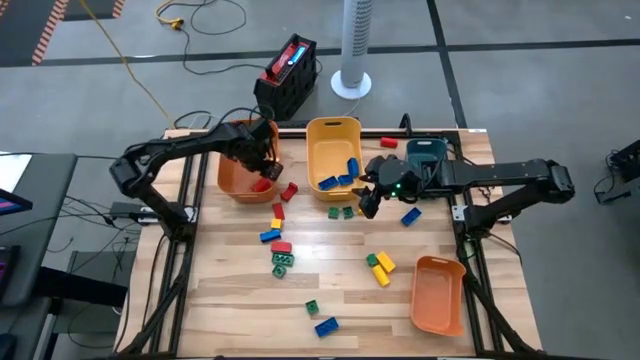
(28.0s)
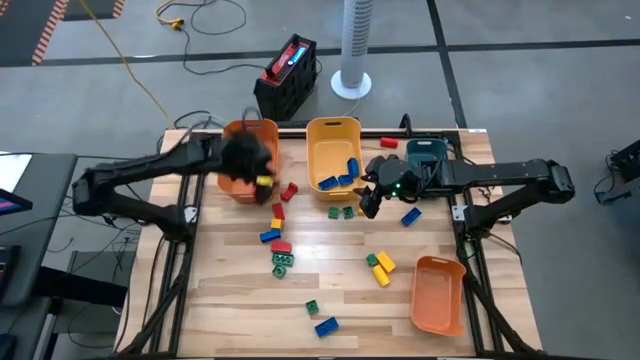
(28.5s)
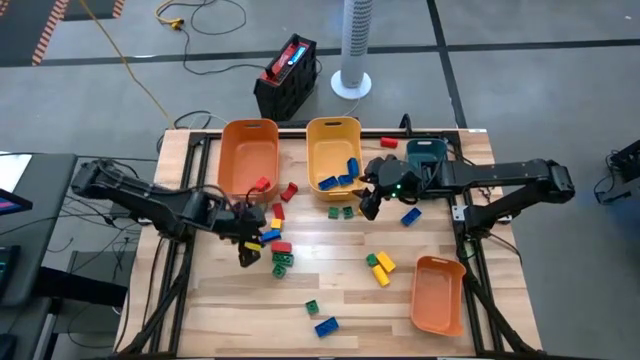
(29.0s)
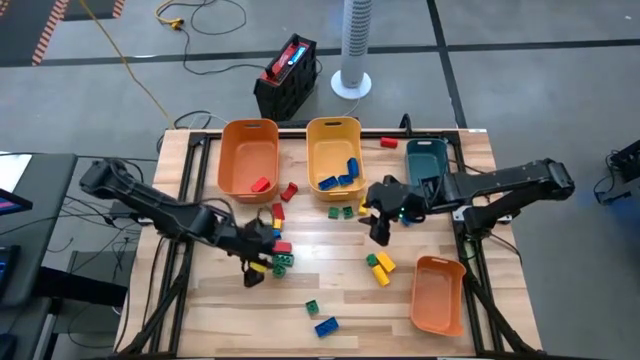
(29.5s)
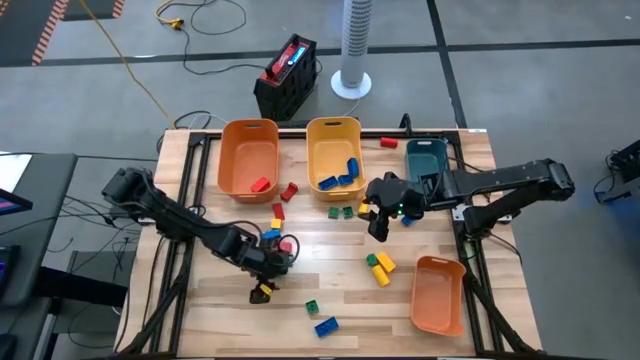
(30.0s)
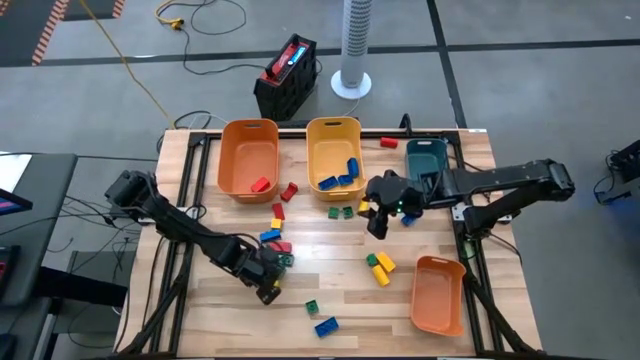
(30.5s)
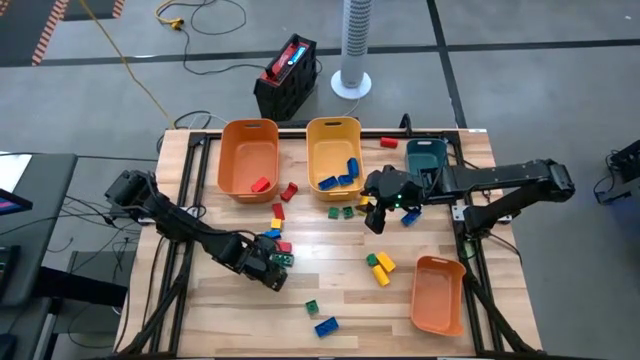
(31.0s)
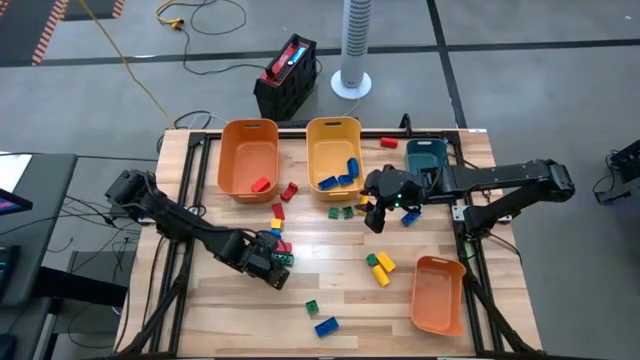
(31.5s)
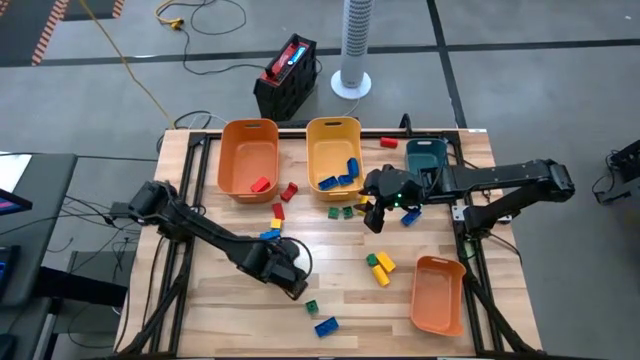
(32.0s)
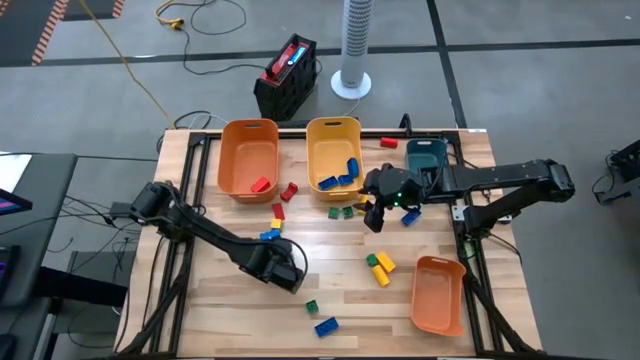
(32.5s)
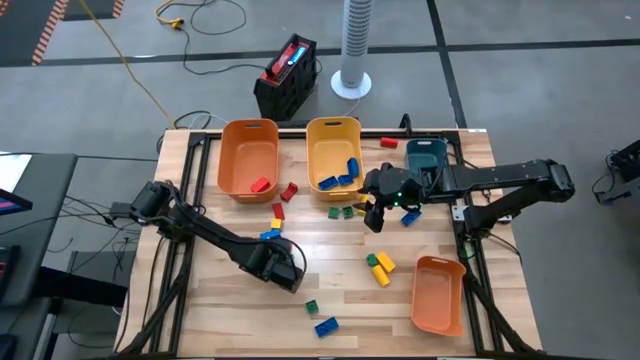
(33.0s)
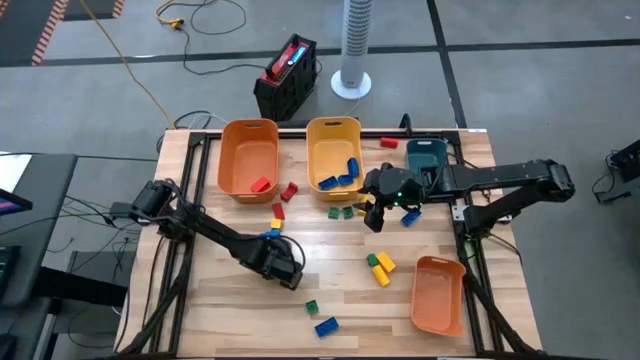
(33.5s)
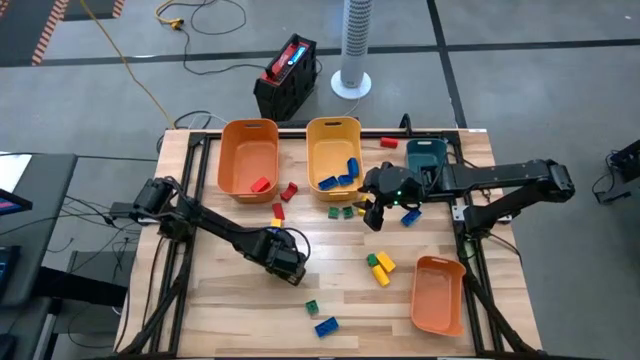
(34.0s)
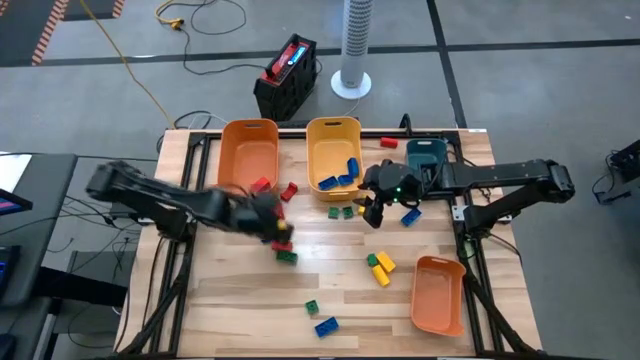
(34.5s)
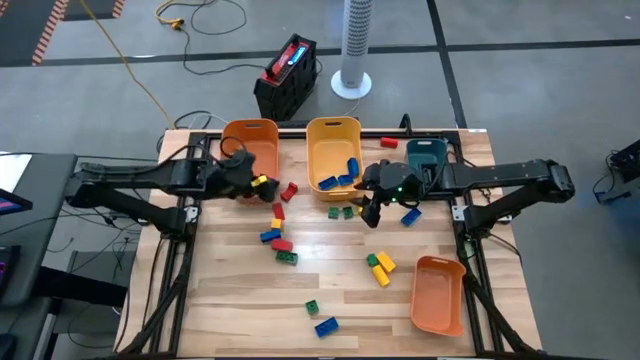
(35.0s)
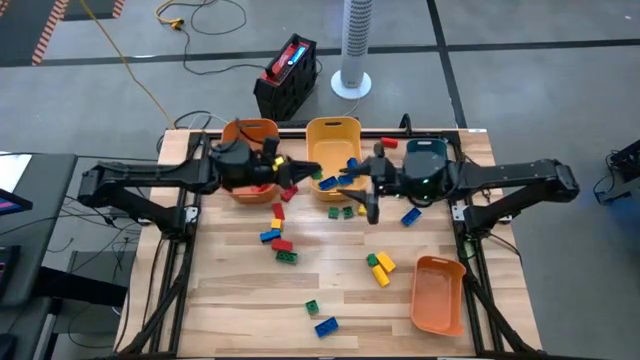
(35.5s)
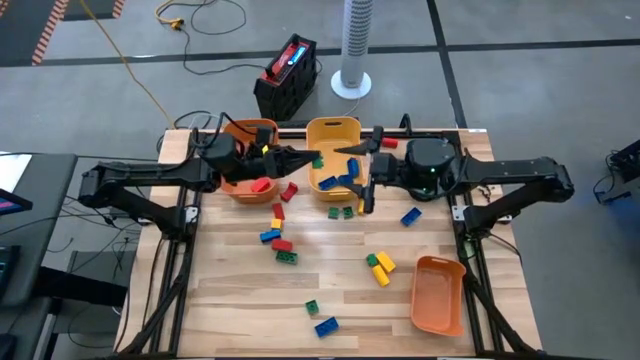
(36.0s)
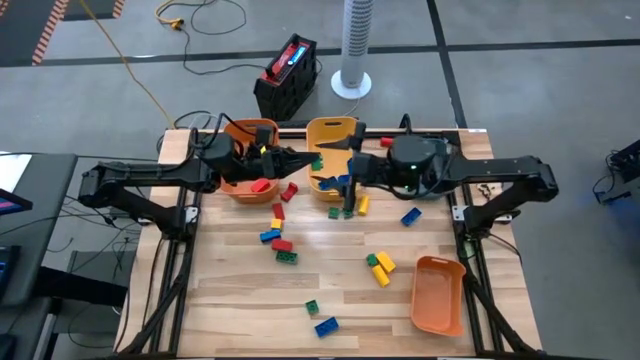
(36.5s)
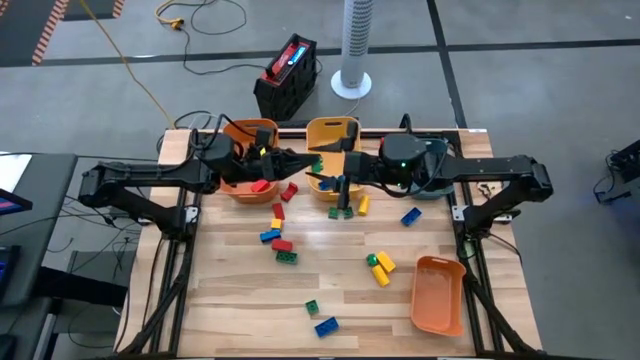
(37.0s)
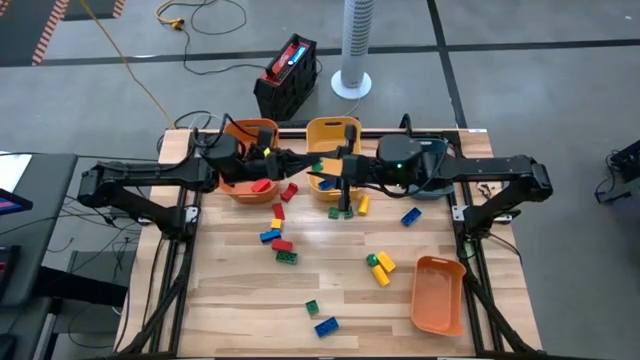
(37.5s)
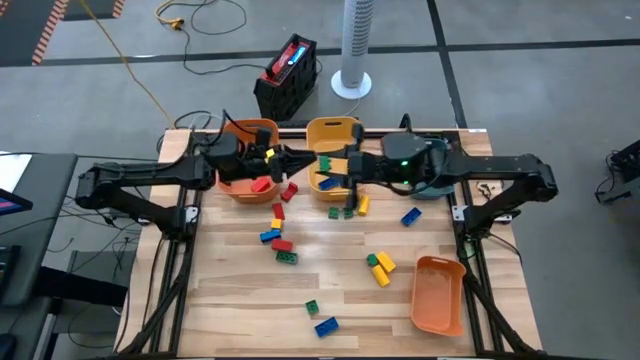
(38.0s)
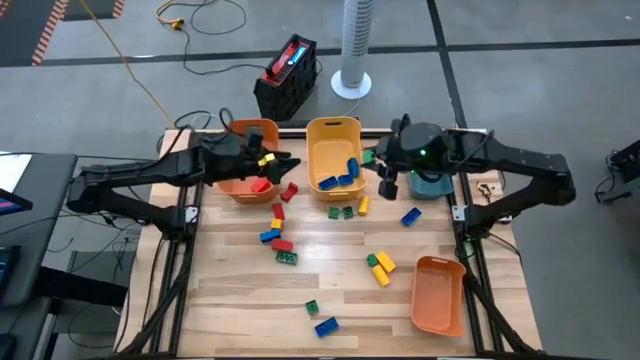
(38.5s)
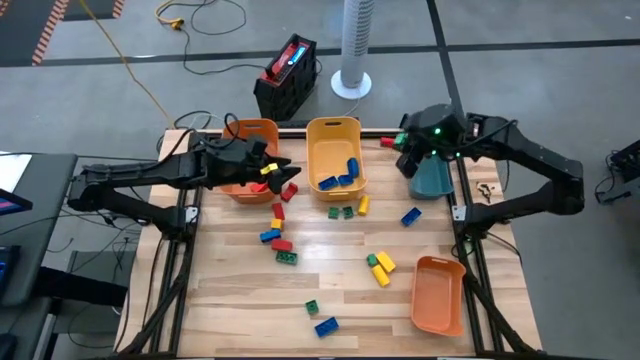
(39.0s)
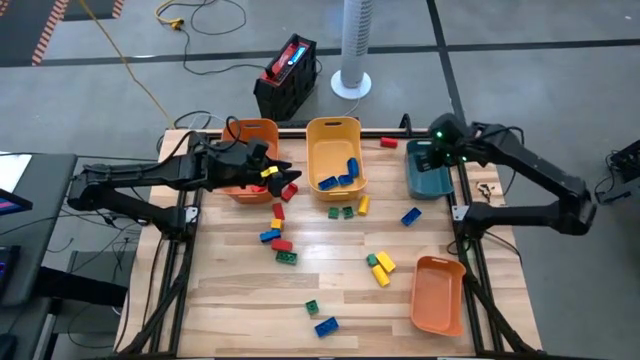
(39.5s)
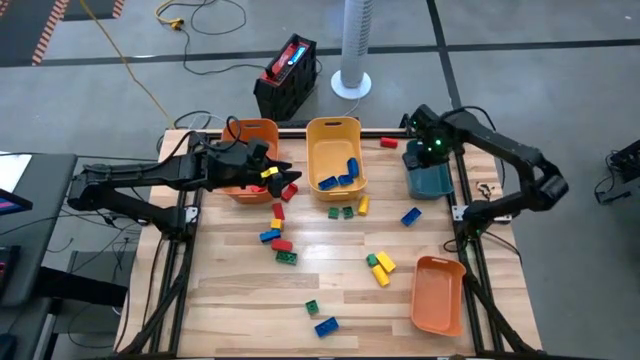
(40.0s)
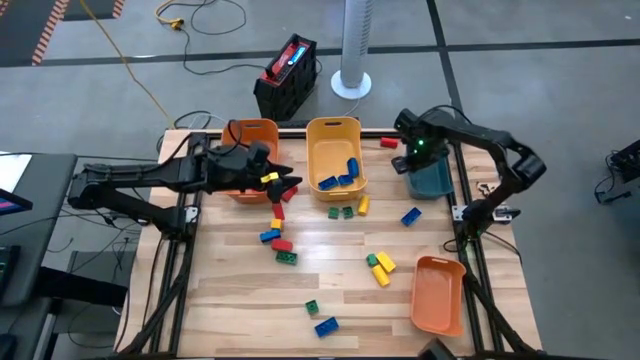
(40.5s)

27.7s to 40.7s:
Task: Sort blocks
Put the green game piece into the blue bin

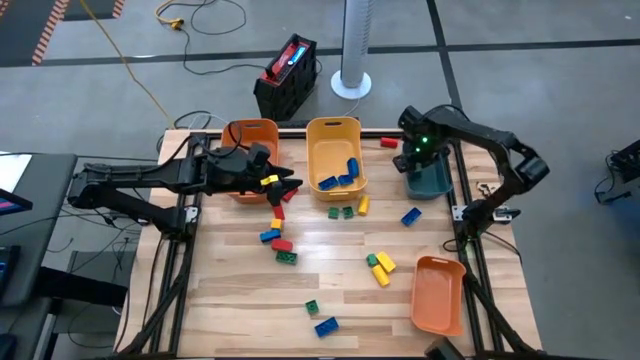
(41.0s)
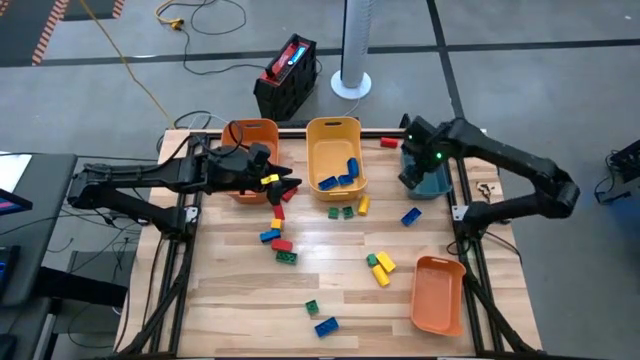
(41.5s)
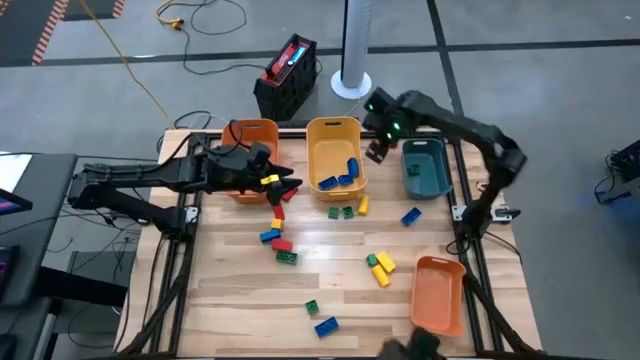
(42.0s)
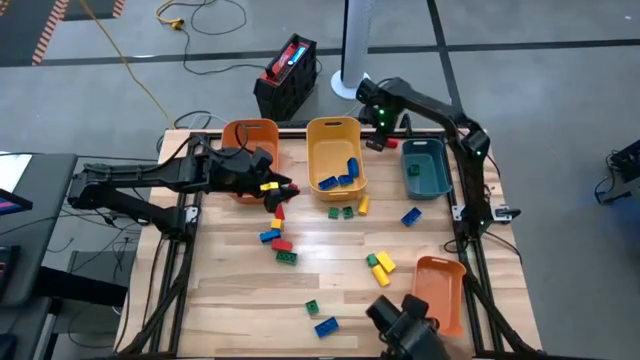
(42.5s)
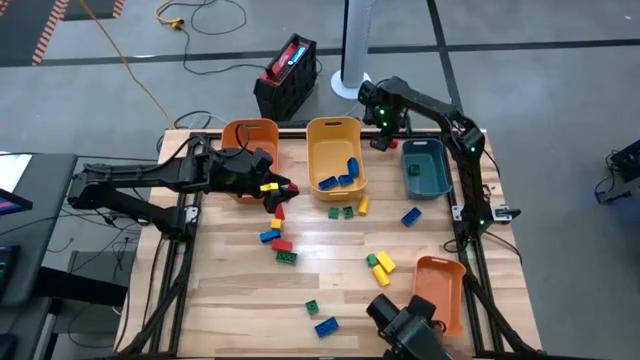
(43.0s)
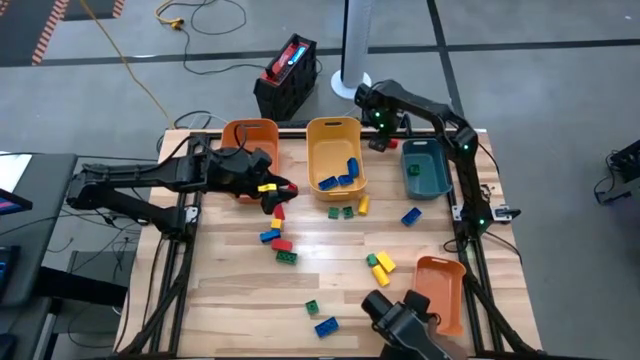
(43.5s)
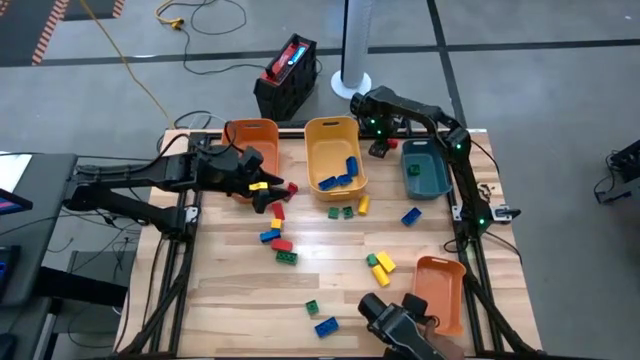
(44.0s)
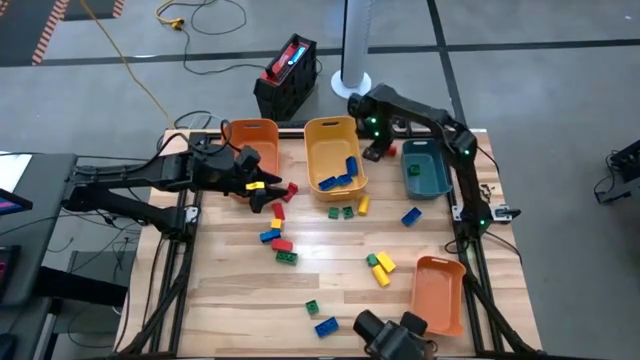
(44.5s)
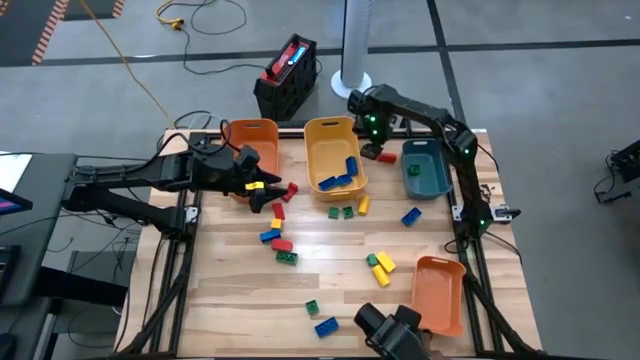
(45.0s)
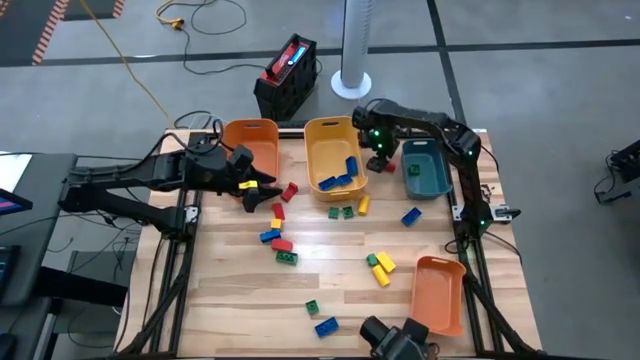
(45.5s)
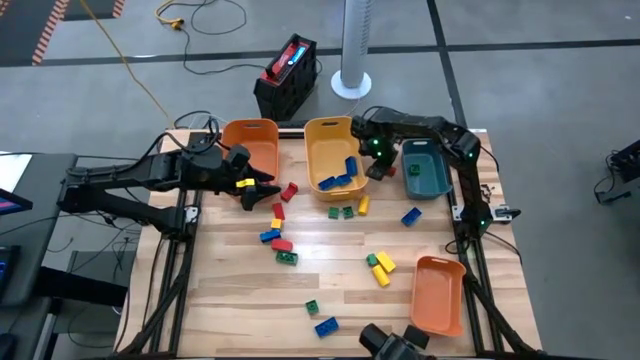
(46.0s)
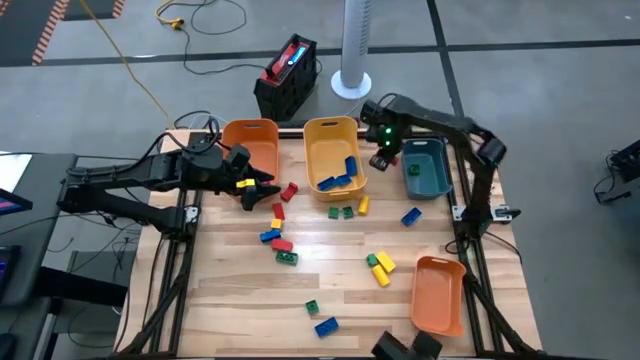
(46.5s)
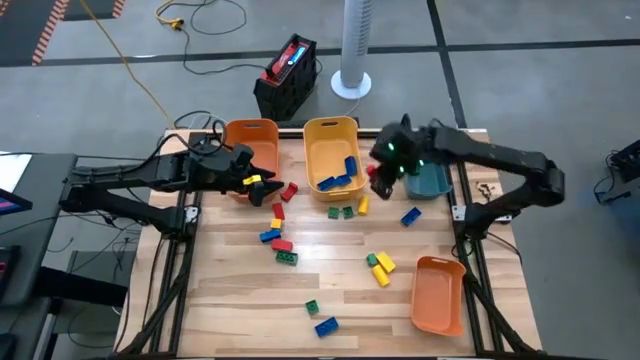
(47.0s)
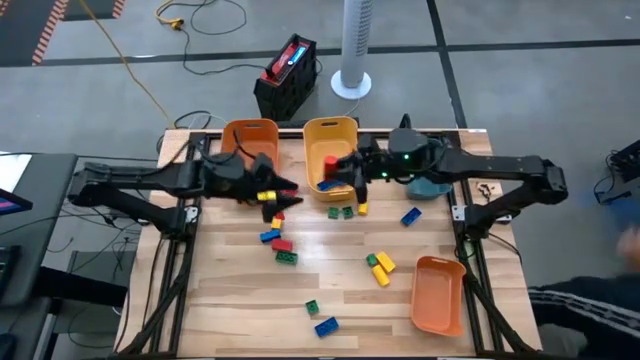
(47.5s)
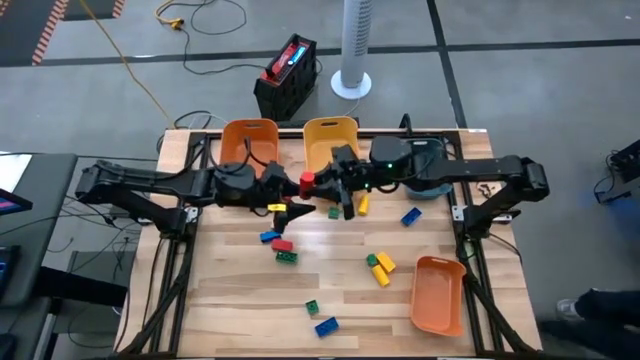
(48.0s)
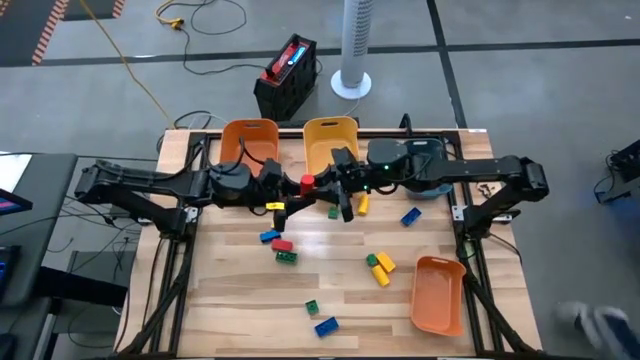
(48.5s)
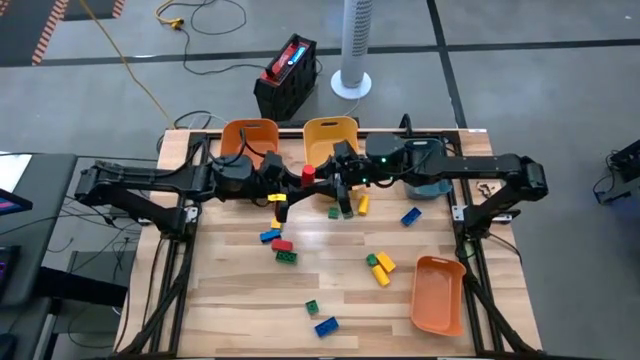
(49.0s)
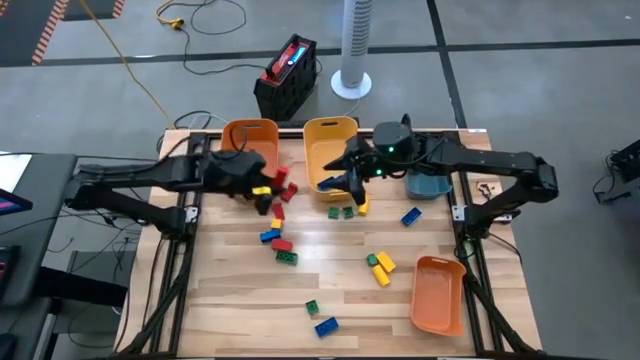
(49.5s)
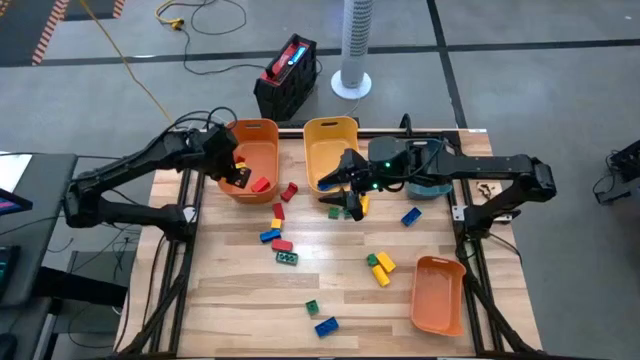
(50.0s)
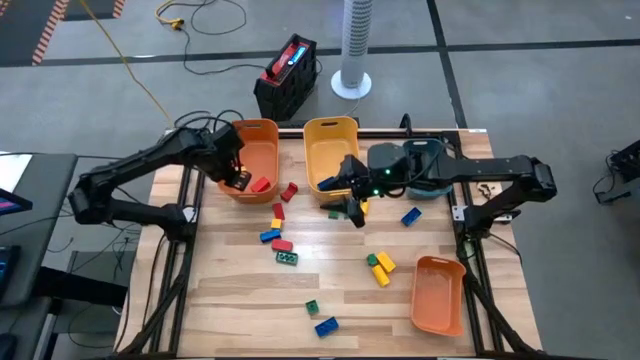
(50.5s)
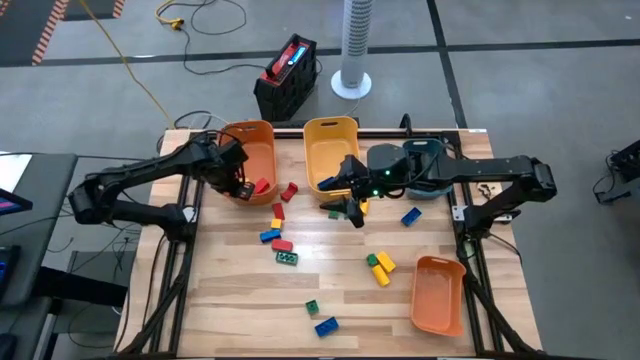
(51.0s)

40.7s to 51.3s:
Put the red block into the top orange bin
